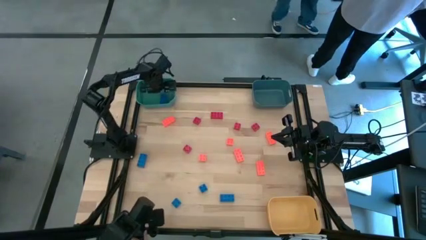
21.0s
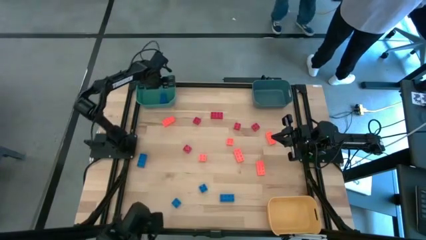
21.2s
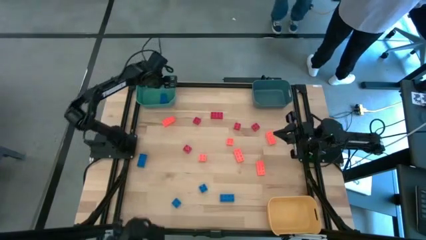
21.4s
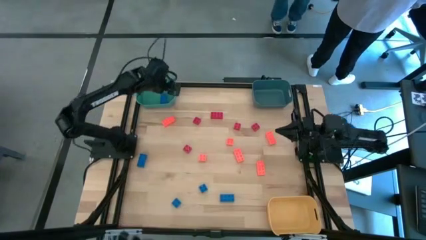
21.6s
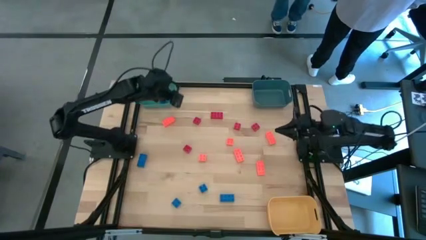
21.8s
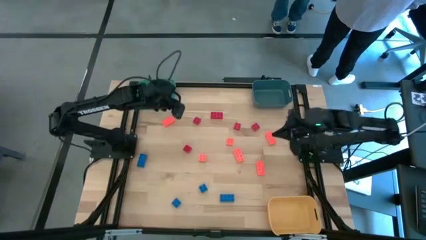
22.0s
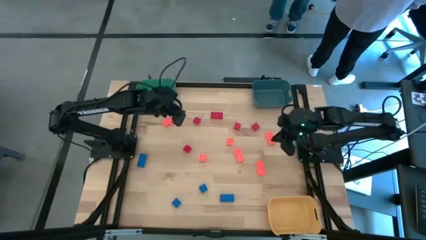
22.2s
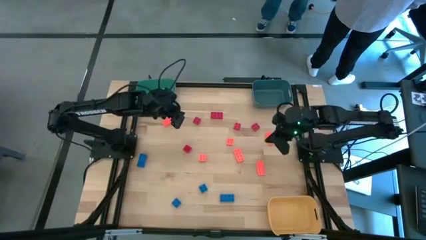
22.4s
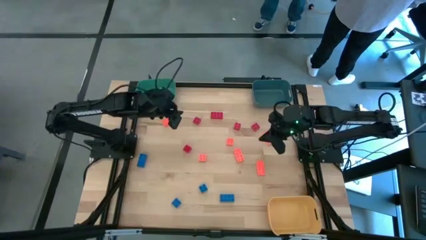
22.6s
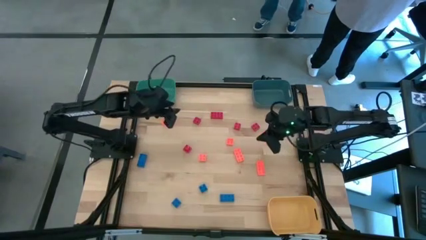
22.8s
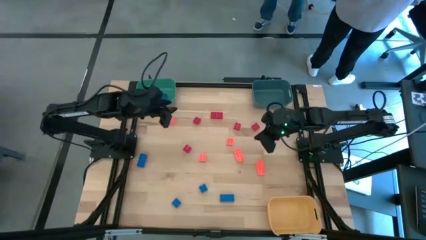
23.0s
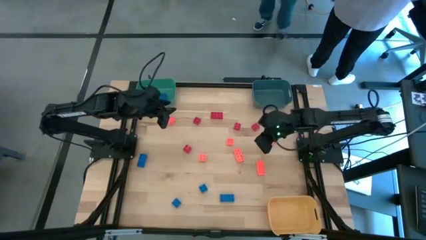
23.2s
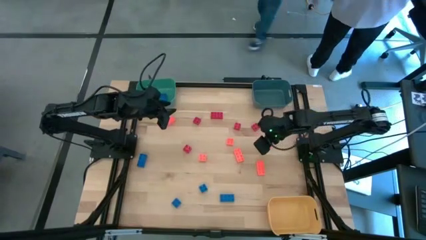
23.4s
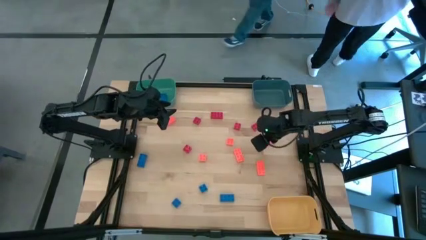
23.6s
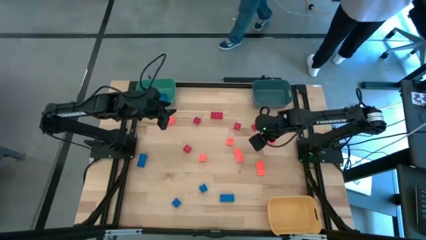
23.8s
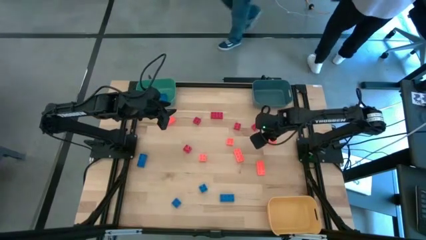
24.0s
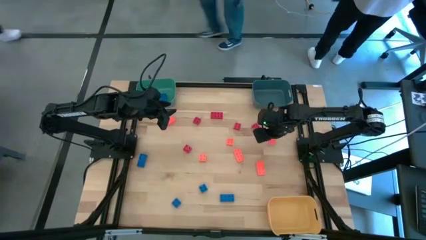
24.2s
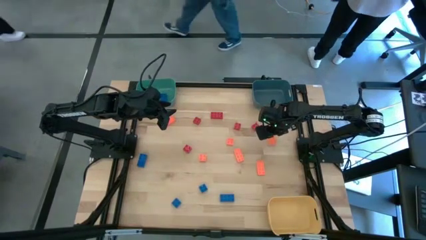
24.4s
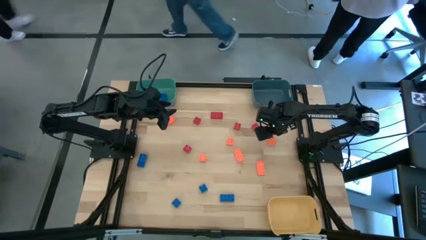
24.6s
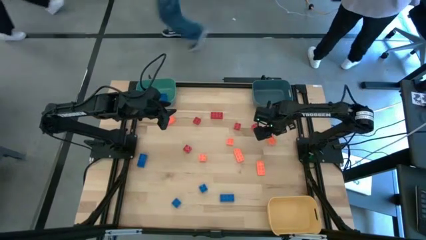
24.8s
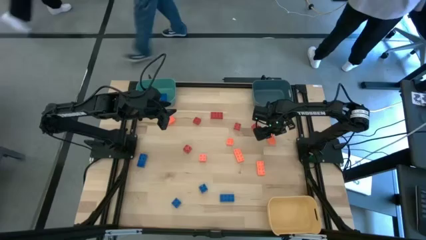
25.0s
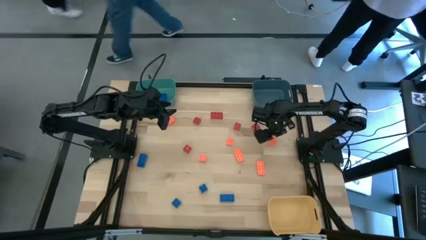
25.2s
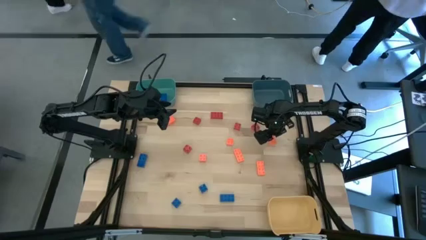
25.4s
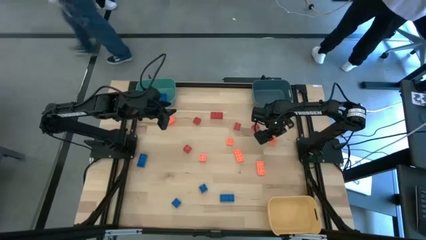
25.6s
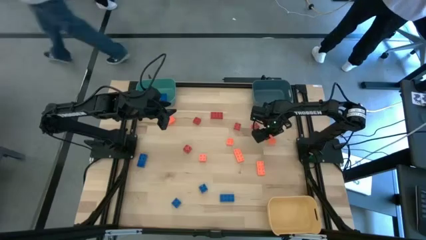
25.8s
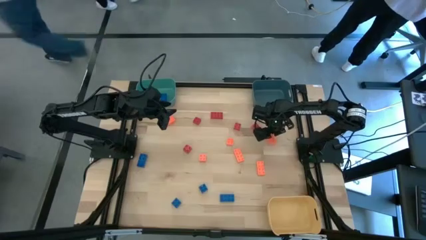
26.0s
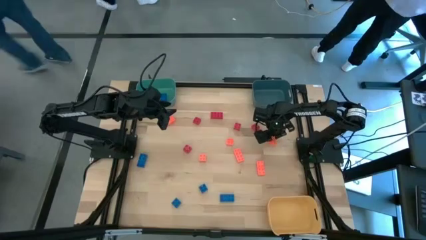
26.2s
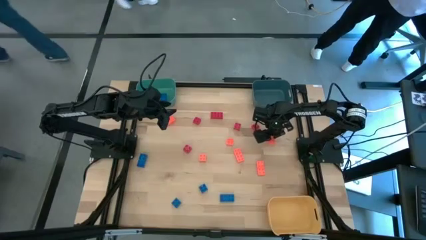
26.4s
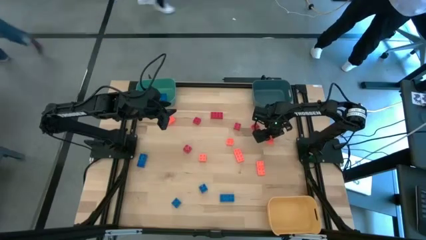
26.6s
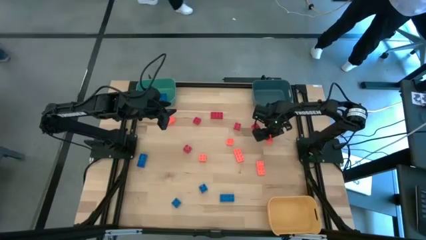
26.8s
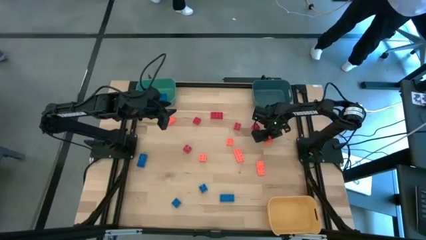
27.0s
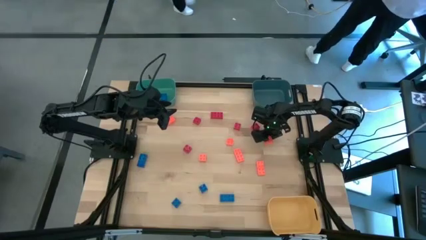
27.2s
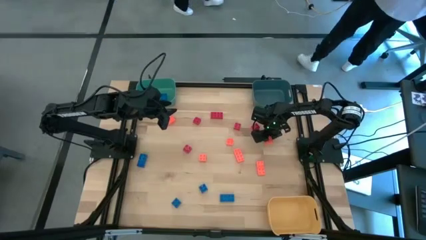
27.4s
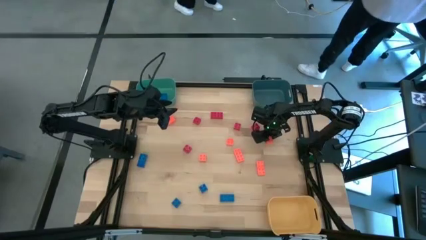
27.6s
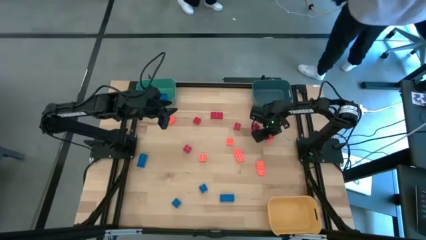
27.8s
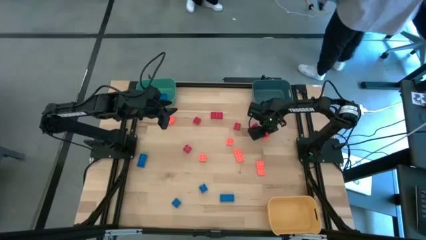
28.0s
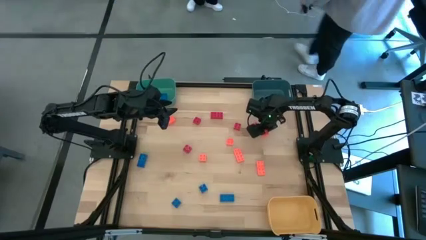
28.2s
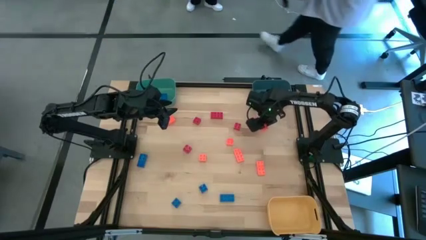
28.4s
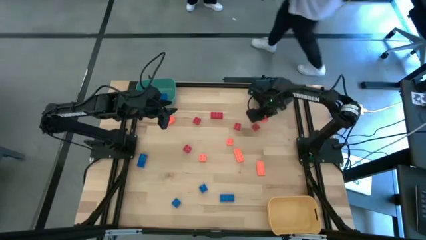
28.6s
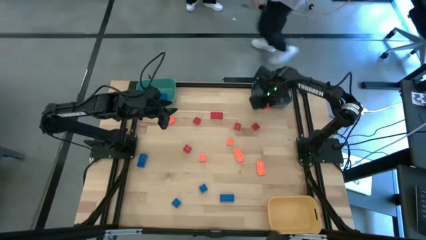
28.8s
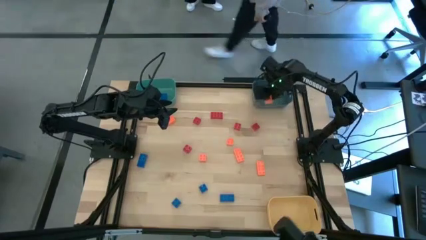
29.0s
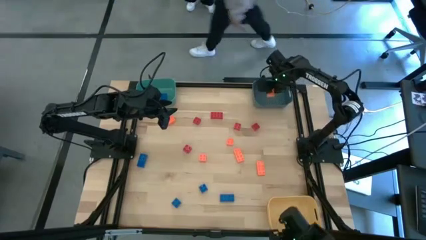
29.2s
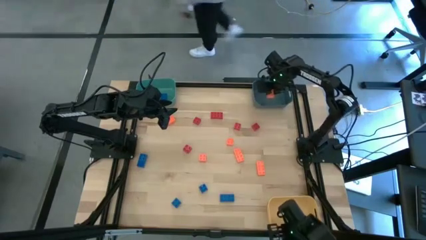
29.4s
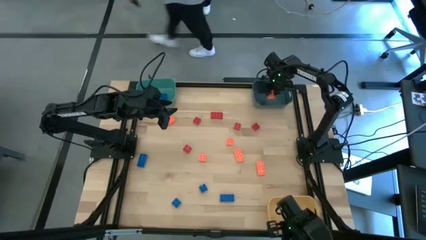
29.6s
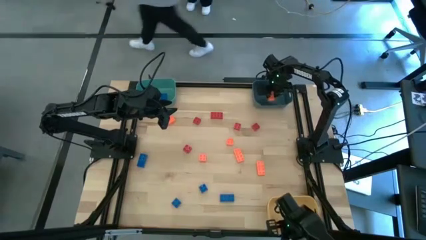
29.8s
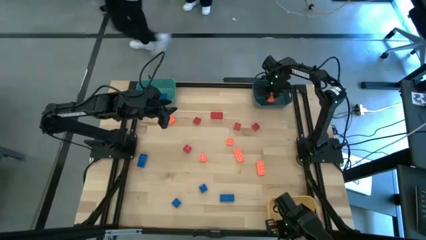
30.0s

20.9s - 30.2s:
Task: Sort & place blocks by color
Put the orange game piece into the blue bin
